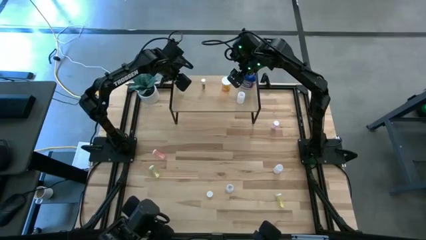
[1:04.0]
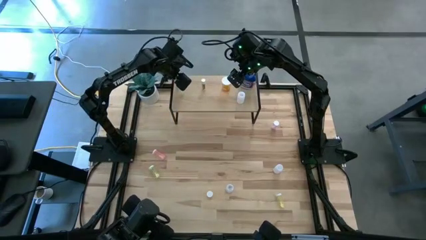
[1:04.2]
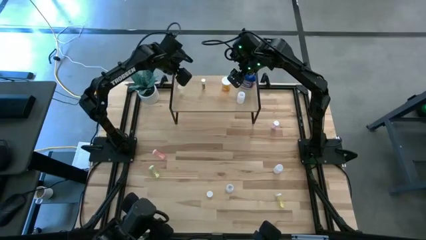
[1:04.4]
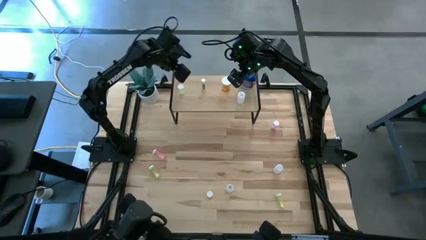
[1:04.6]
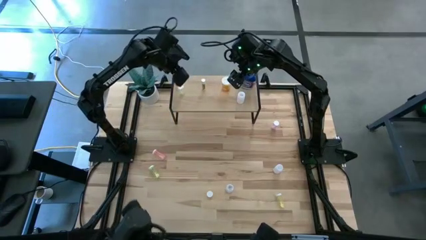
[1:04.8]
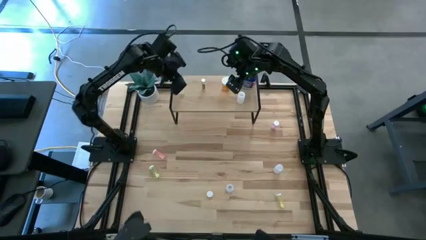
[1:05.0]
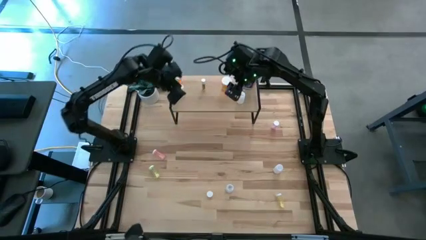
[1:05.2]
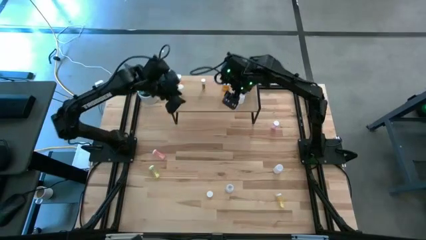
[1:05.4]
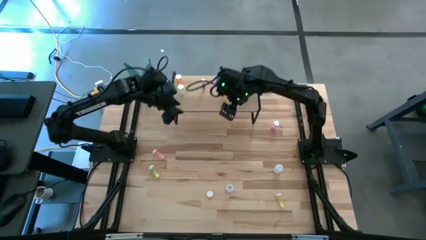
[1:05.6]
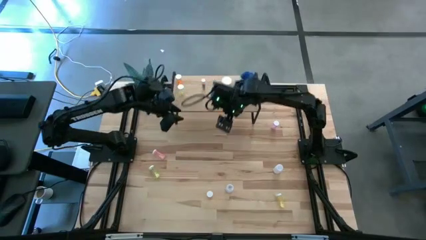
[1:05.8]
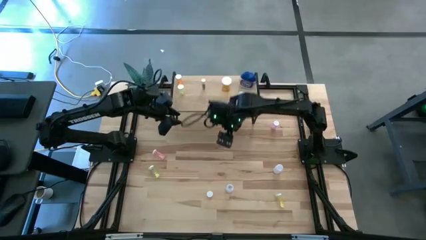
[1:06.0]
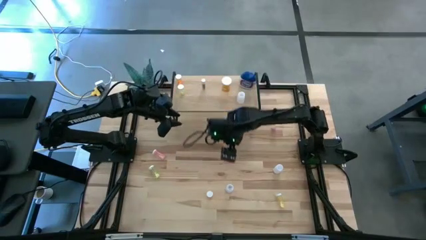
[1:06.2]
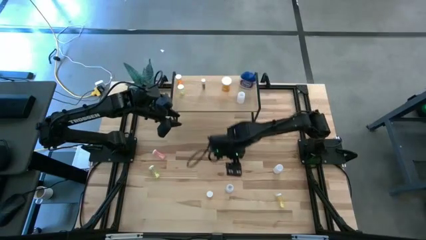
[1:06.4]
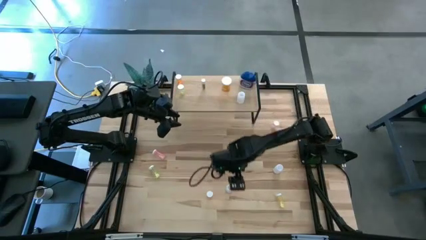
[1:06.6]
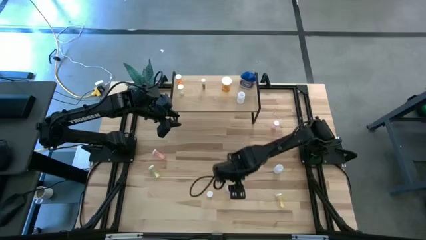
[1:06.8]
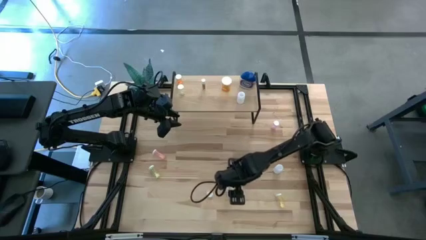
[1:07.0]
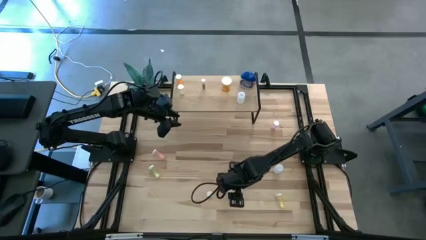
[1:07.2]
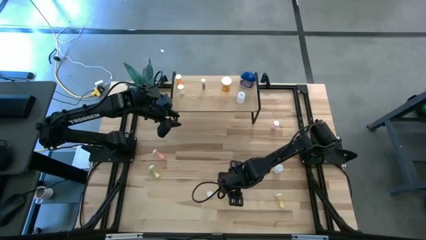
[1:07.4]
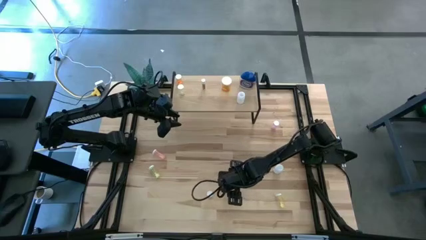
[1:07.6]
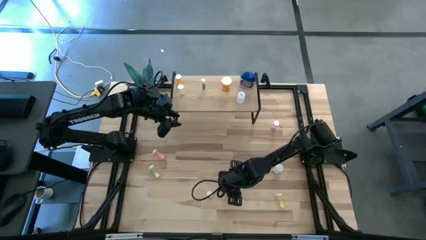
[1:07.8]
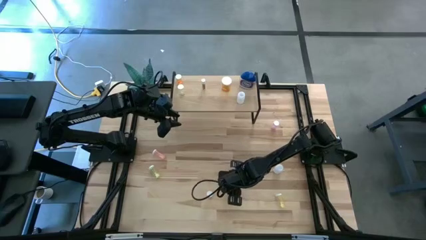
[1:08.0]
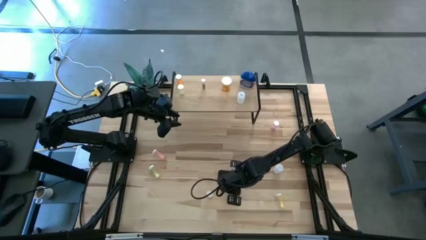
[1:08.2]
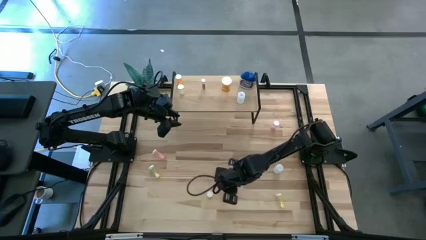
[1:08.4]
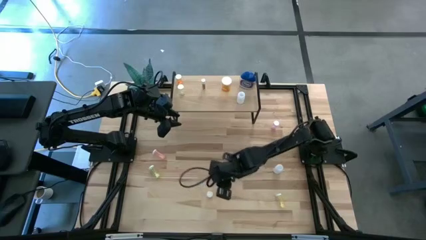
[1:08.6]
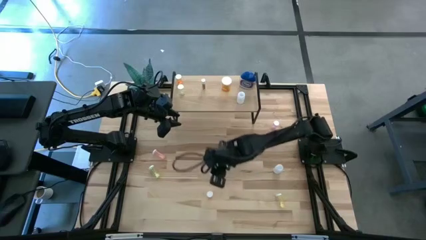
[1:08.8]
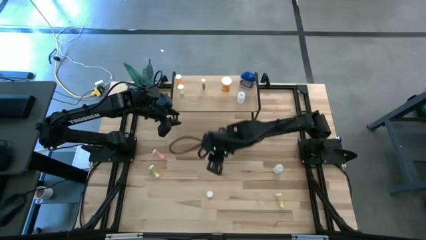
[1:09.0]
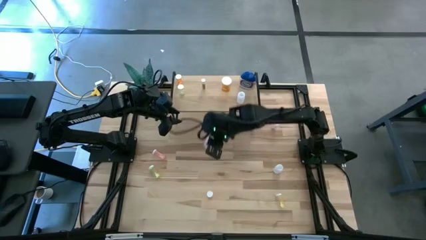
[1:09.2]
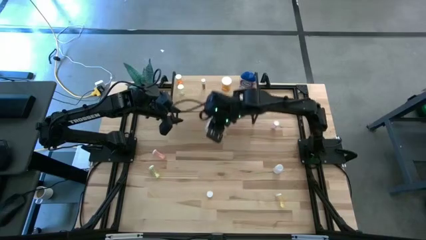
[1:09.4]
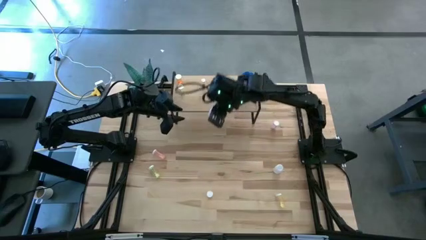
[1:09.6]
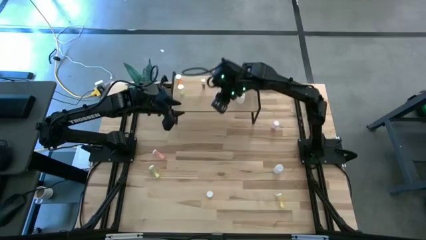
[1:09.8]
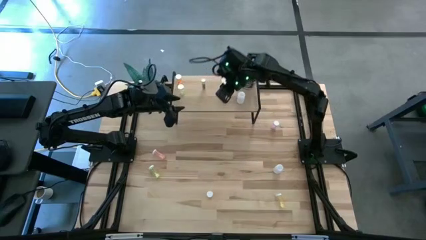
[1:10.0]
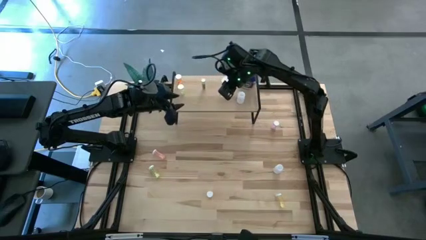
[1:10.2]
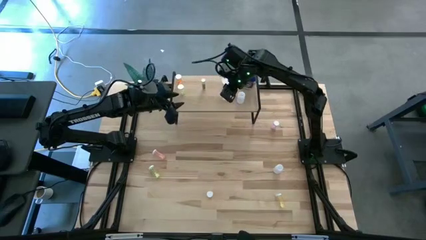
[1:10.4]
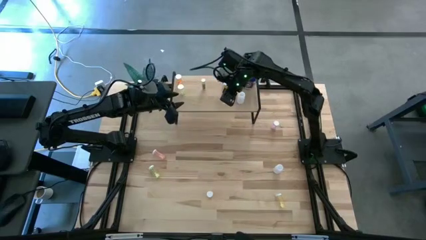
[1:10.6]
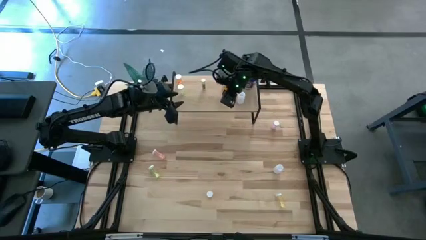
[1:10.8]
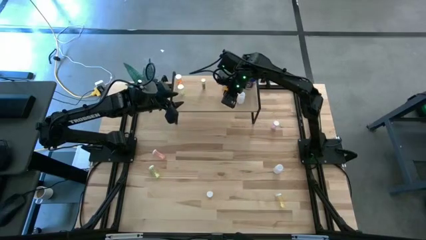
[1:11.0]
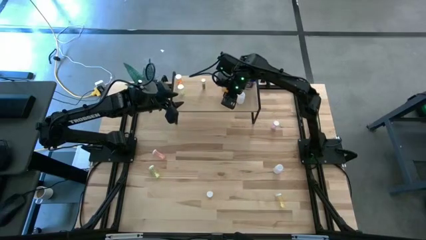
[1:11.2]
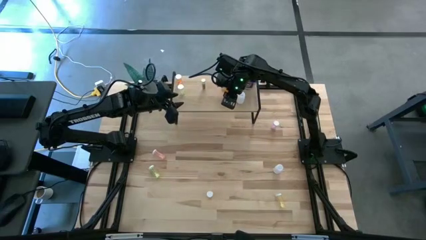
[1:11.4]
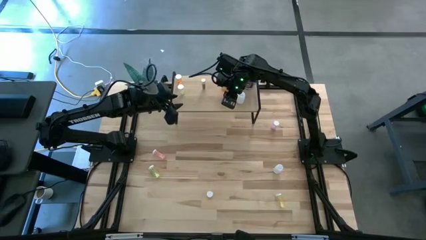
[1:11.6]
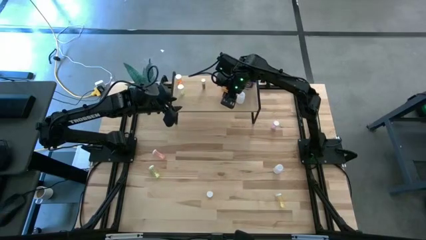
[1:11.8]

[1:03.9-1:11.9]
Task: Pick and place medicine bottles onto shelf by color
Put the transparent pill bottle on the shelf

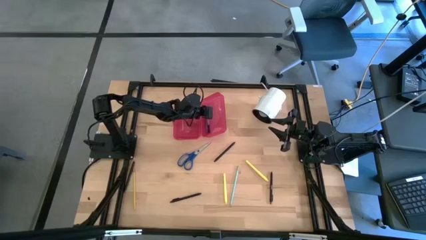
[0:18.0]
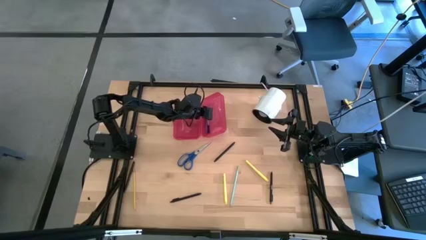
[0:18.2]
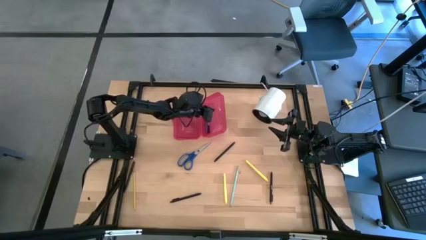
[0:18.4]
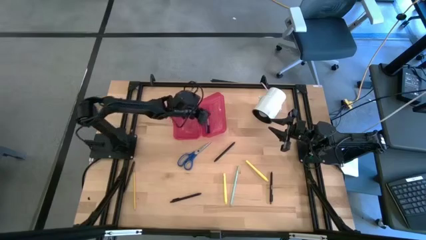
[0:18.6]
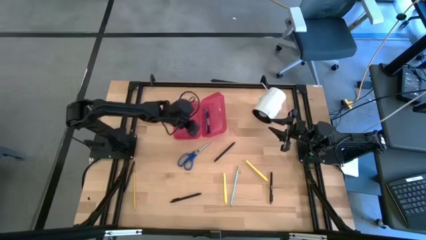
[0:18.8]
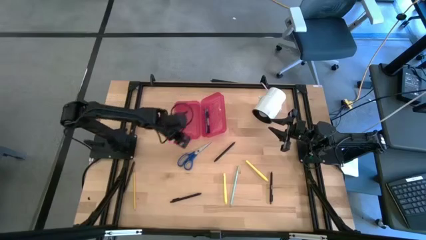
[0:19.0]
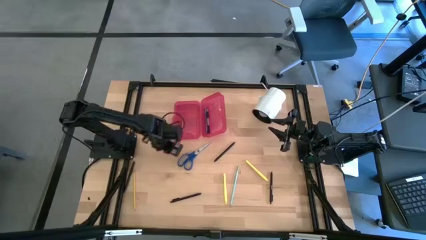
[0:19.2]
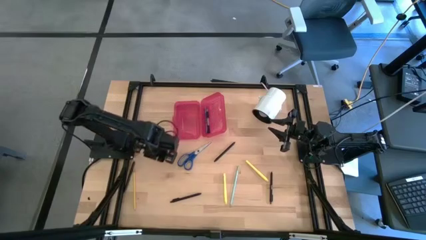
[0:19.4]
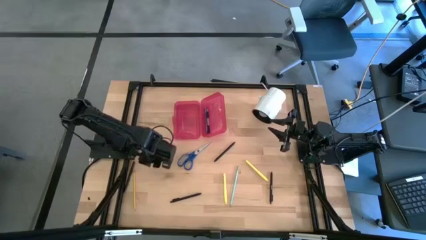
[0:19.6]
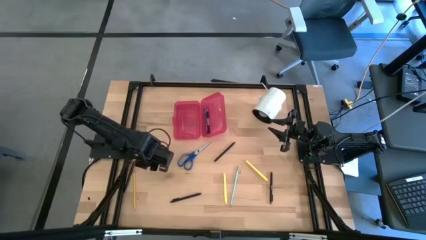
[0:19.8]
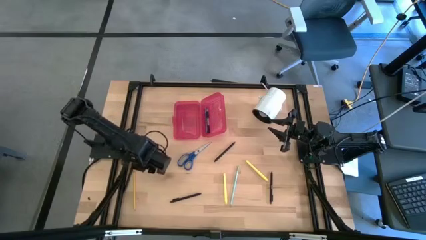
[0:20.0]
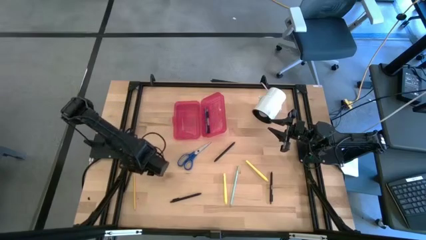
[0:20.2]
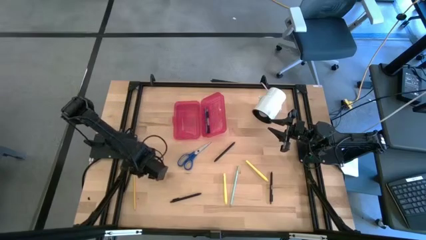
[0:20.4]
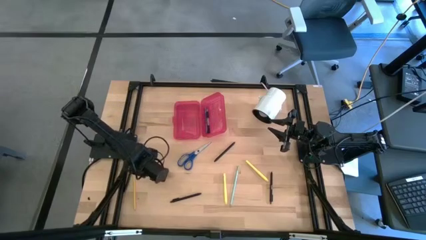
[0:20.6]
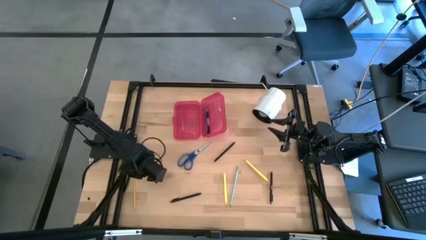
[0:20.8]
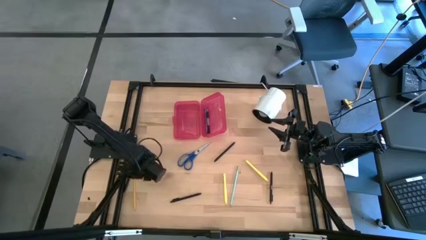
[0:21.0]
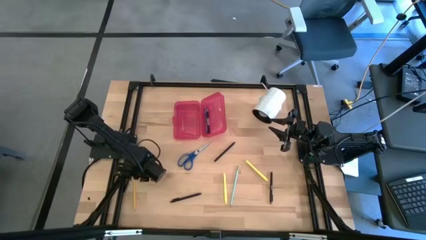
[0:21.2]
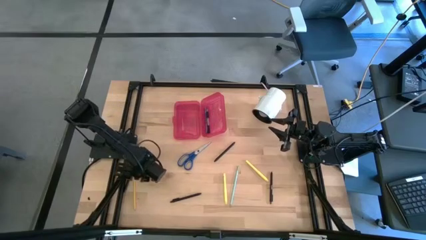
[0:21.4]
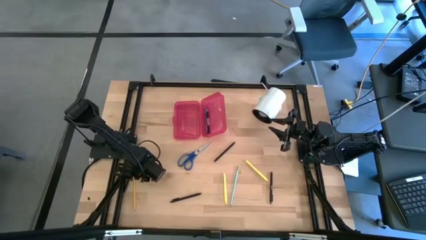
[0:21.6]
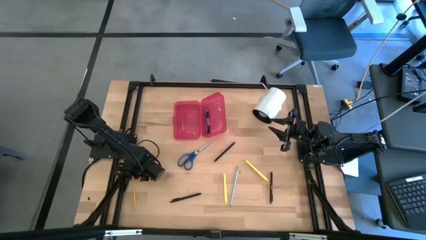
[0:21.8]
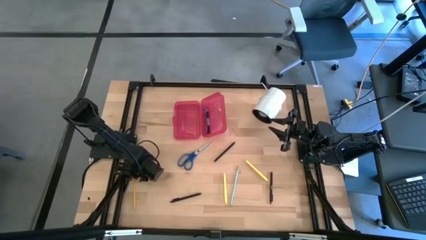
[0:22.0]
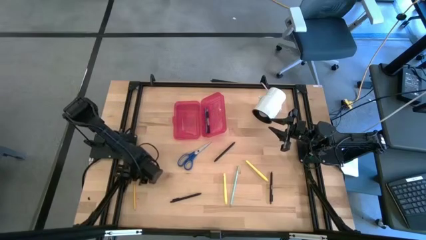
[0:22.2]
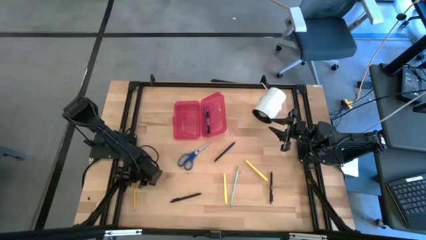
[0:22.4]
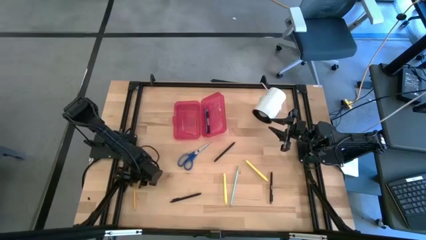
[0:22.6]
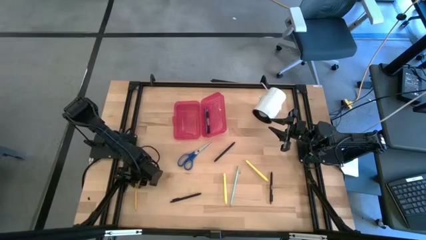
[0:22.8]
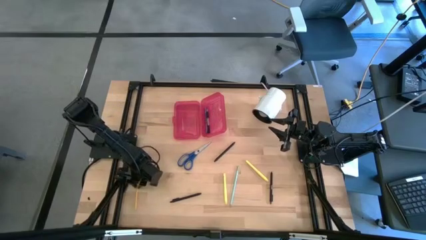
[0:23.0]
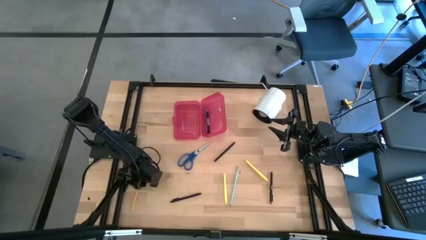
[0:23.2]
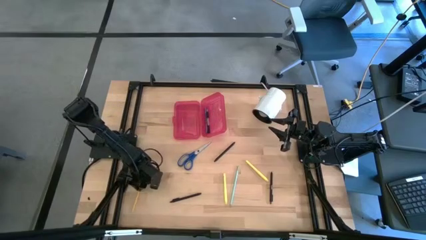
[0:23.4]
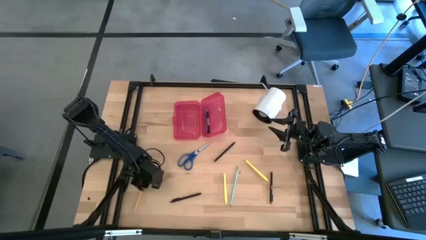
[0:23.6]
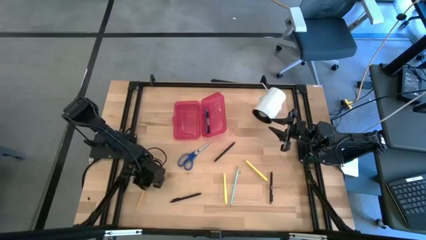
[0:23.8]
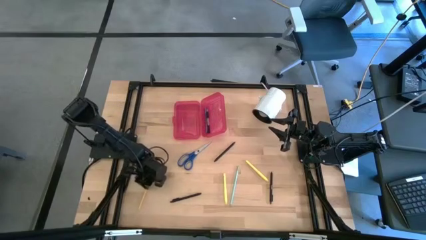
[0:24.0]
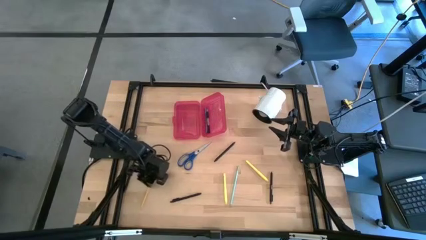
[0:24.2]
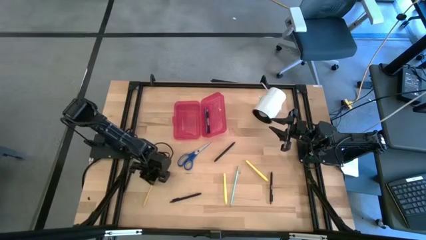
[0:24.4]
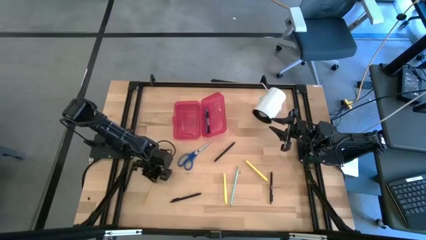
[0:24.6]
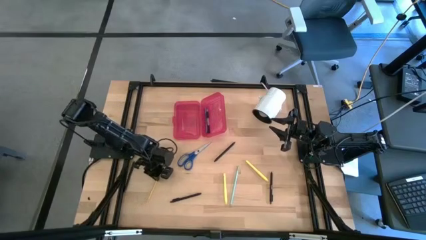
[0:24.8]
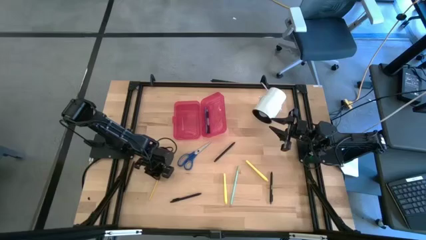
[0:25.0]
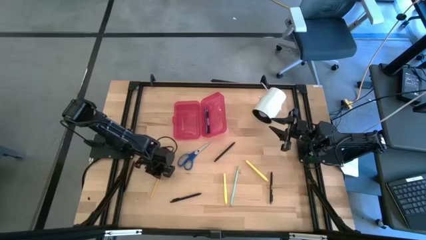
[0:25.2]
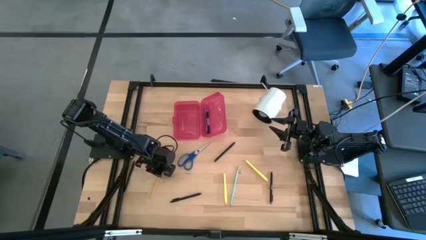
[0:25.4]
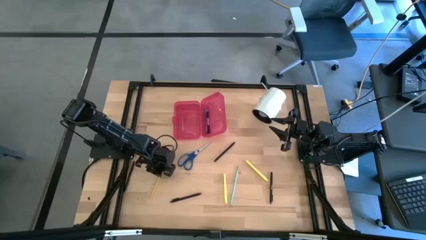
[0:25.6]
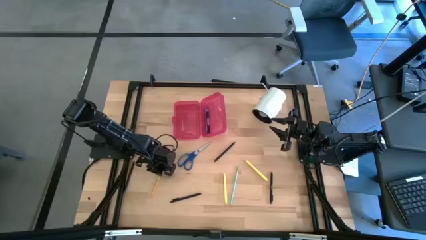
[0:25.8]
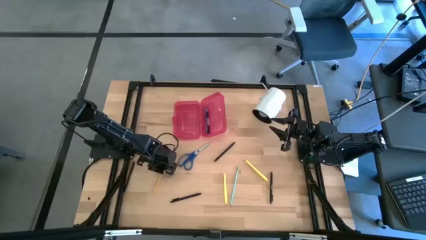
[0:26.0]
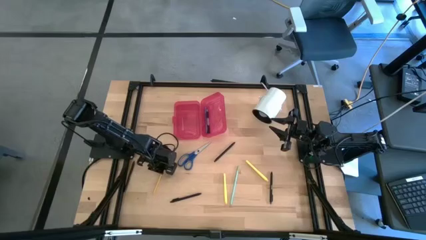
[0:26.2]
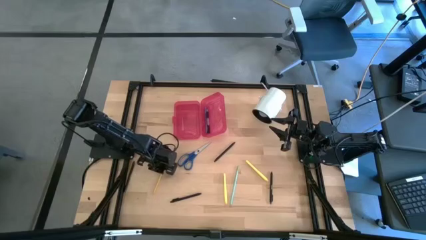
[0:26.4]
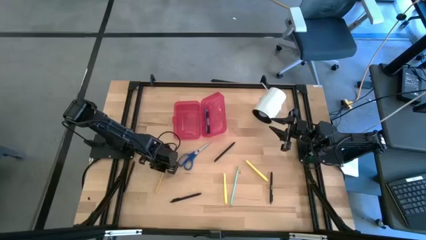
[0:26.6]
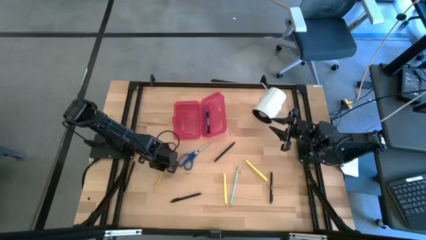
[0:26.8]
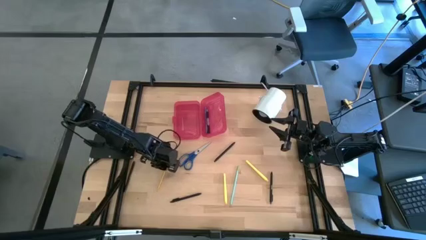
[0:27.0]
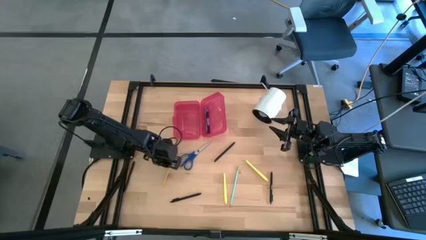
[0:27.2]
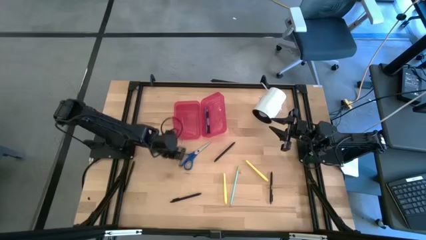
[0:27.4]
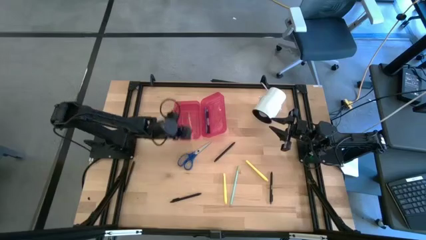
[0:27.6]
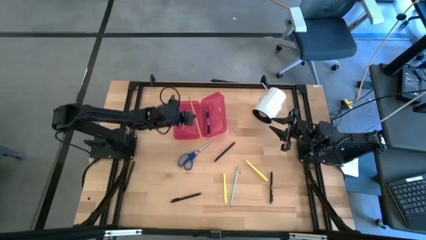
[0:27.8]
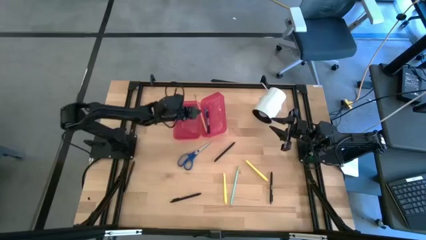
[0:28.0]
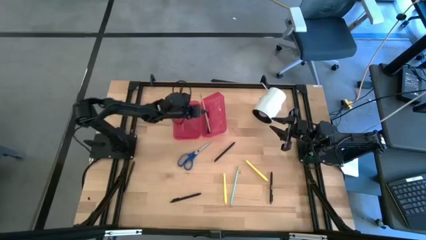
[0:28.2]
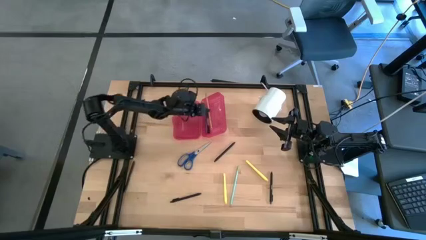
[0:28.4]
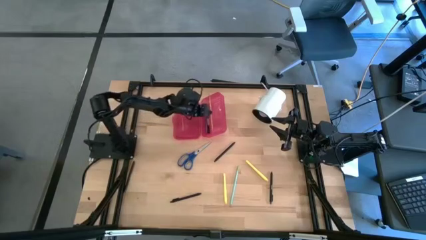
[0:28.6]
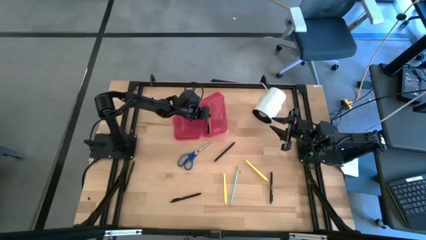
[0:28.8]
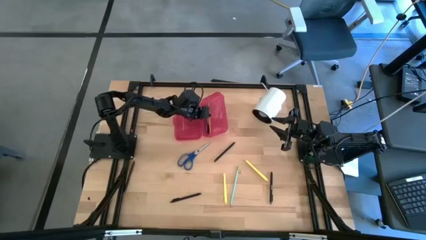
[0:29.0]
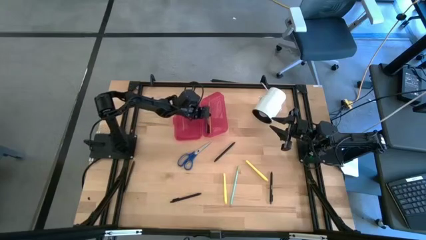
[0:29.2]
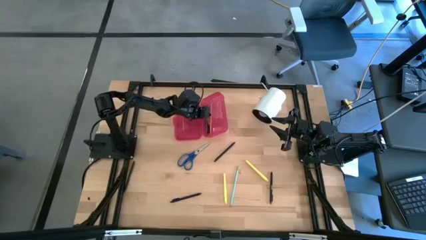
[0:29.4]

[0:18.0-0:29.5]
Task: Pick & place school supplies into a supply box
Put the yellow pencil into the red supply box
